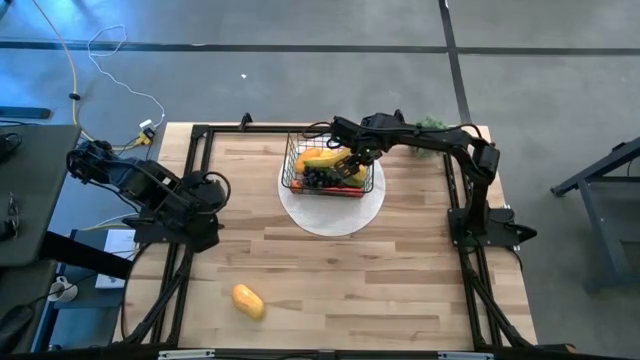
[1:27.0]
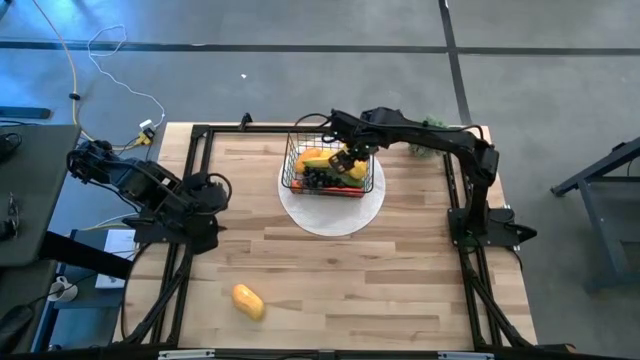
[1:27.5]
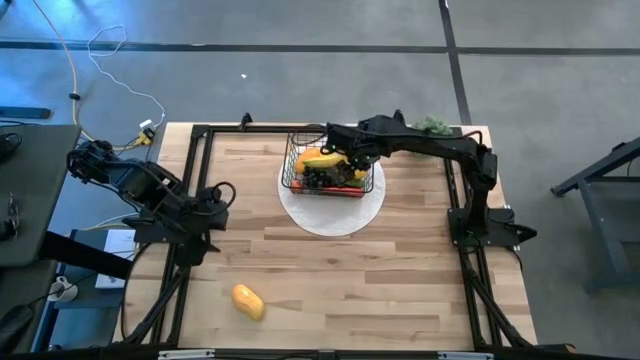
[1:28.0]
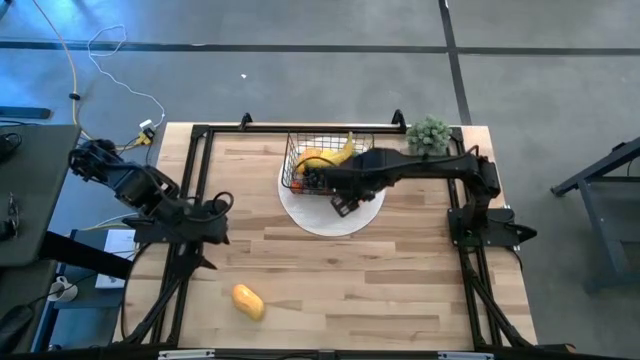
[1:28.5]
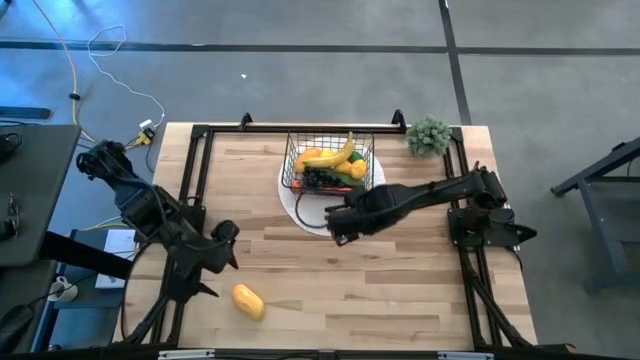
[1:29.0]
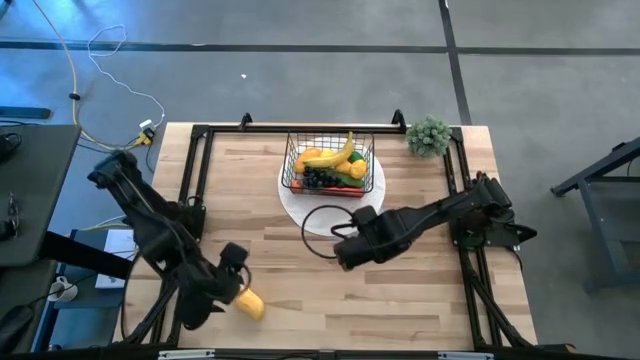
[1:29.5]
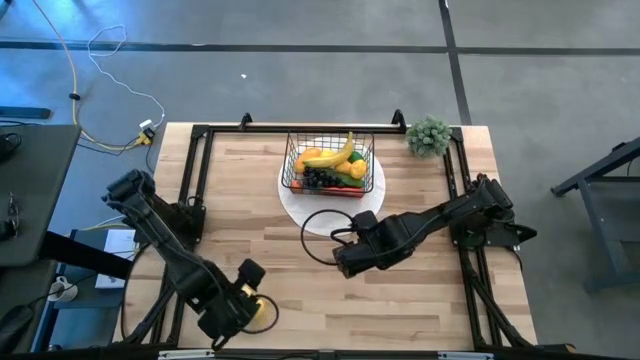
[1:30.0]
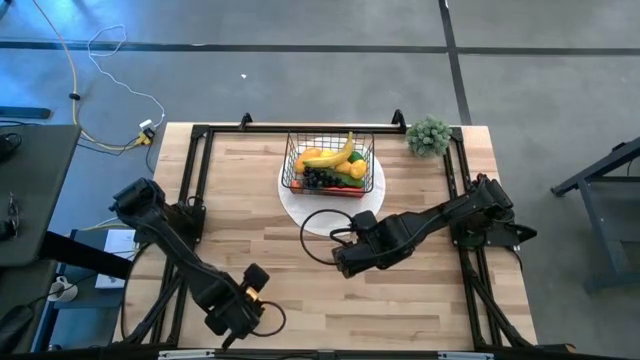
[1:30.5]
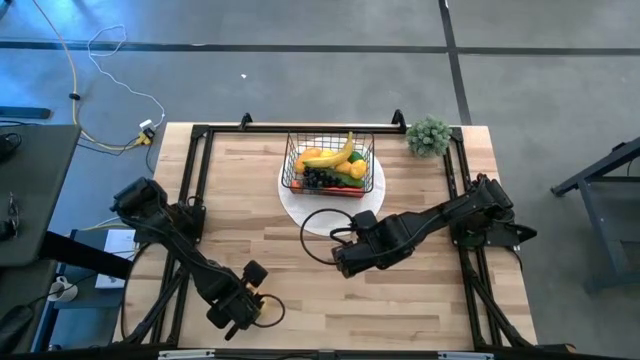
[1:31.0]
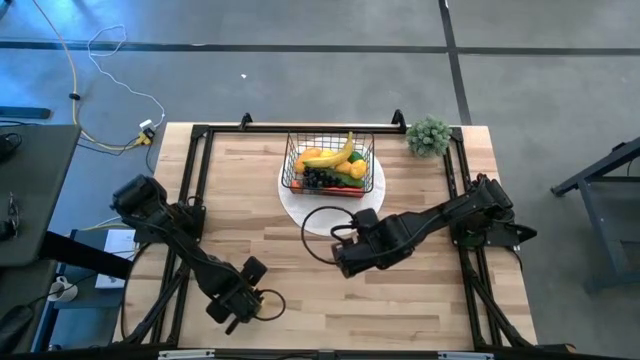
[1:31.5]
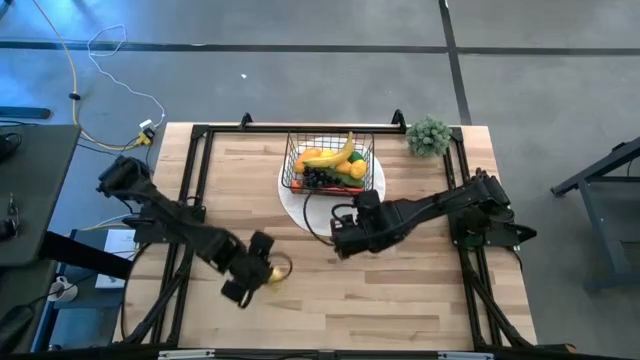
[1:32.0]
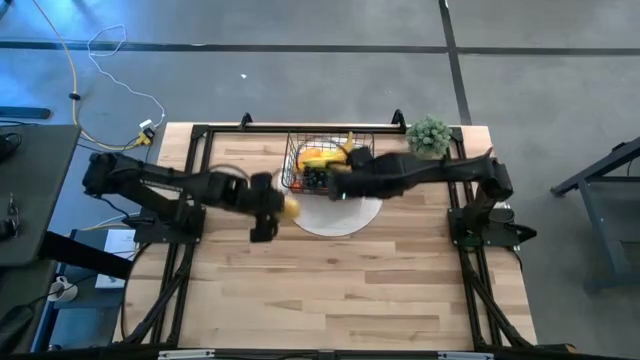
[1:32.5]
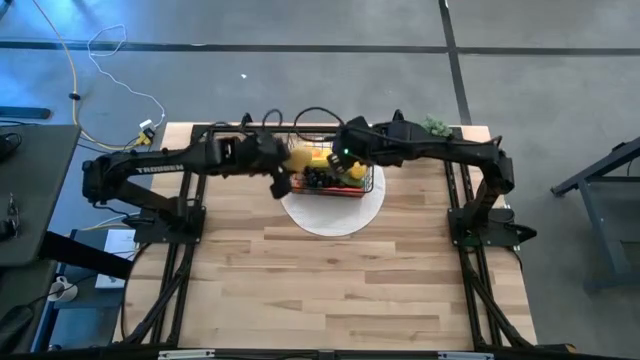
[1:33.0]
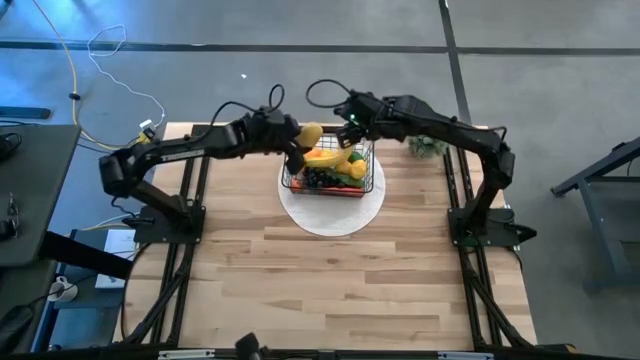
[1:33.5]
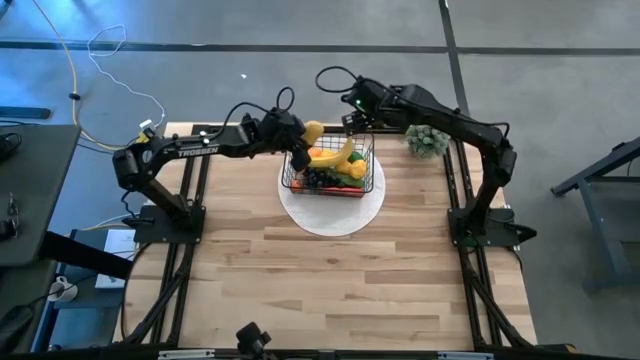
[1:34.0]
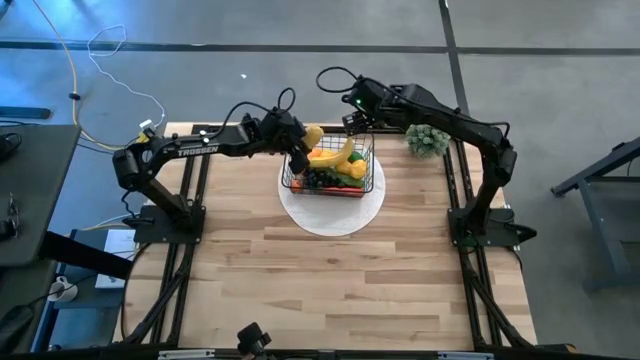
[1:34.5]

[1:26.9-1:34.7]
Task: Build produce basket
Put the yellow mango into the wire basket

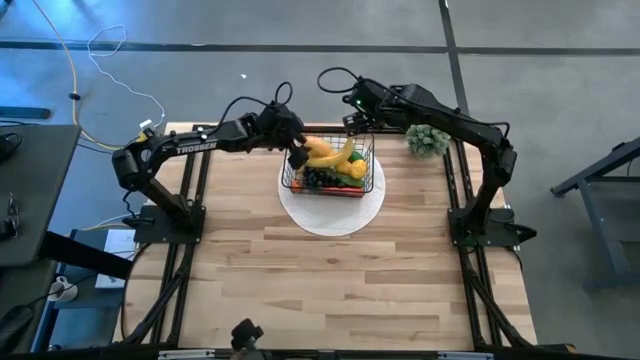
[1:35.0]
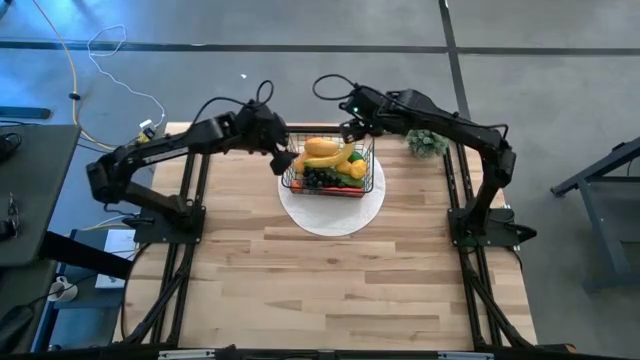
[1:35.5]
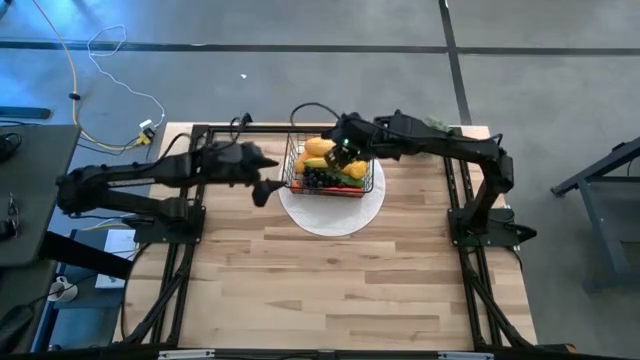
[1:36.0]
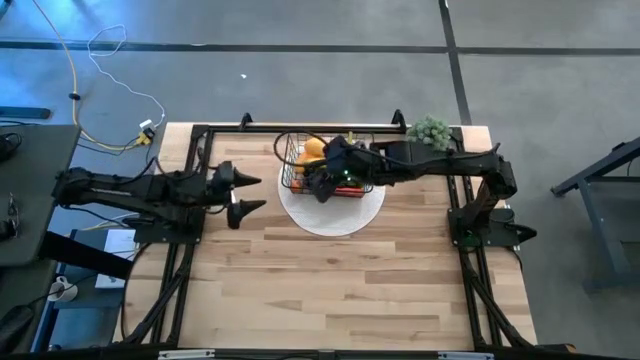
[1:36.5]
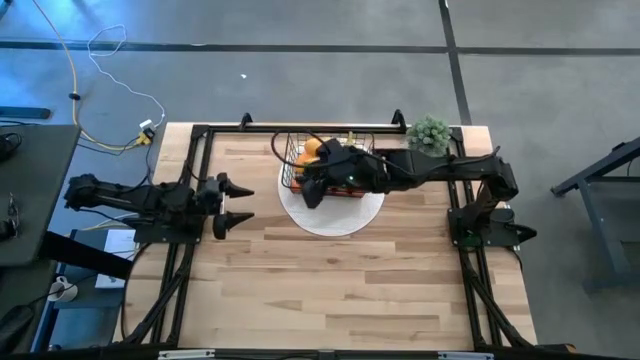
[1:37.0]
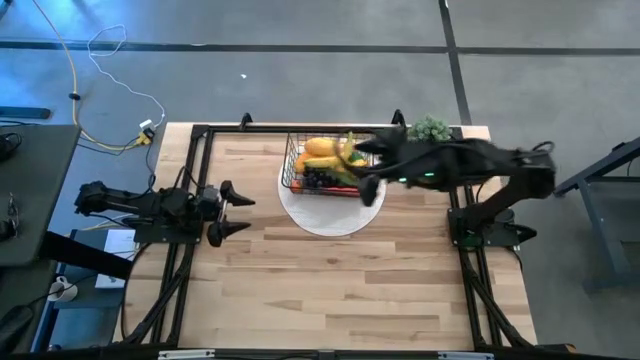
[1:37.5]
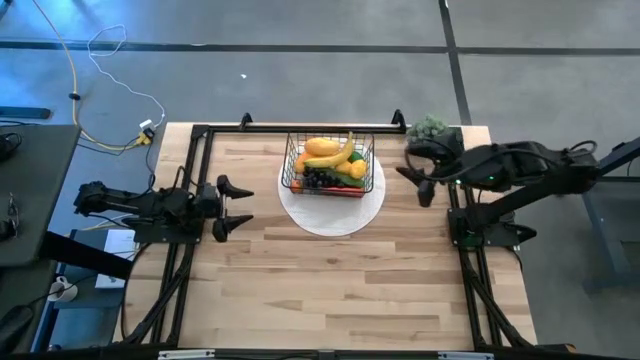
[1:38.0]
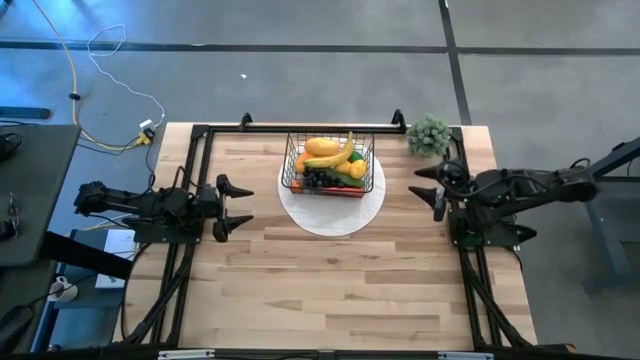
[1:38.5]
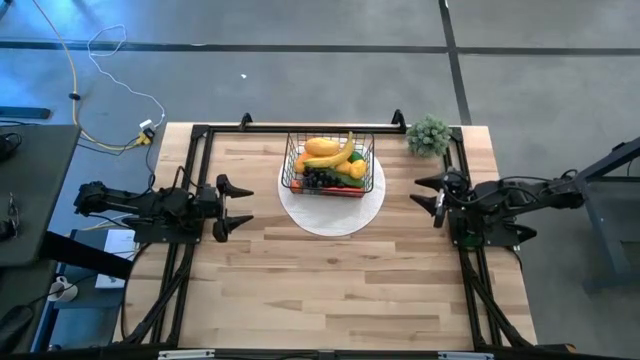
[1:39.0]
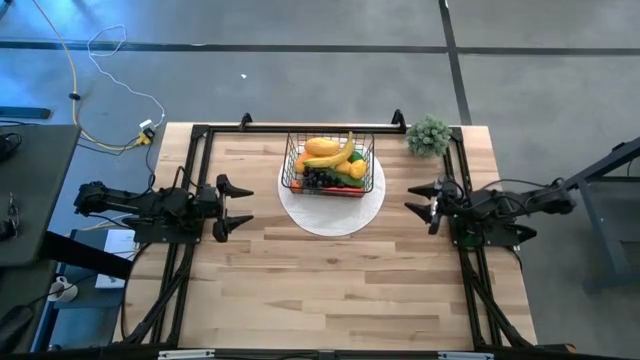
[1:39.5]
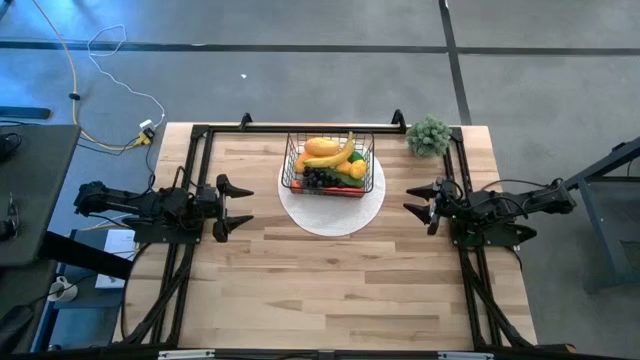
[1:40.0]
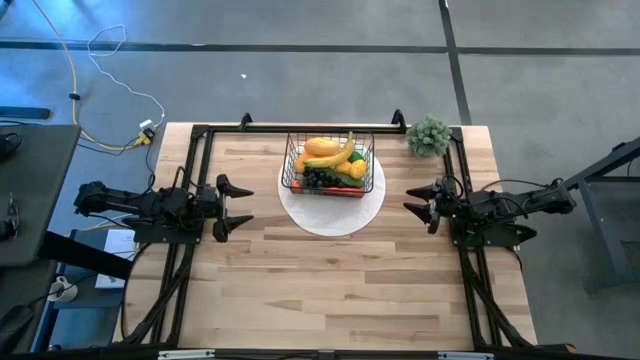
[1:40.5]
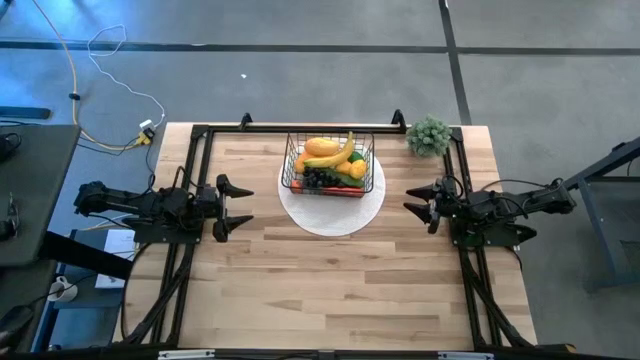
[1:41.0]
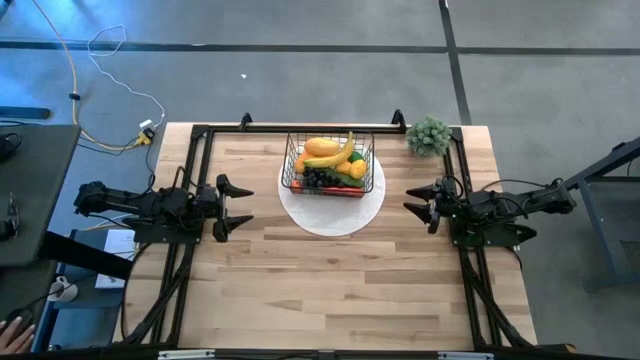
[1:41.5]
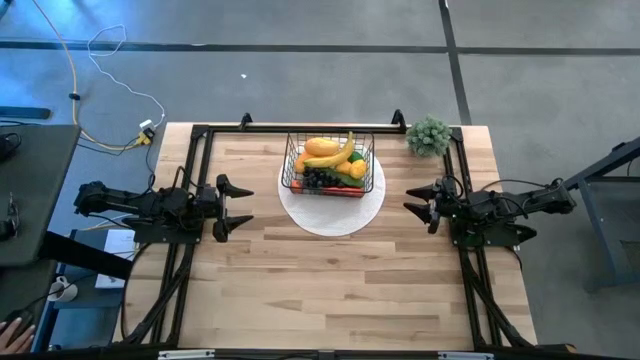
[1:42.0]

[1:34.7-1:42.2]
Return to Home Position

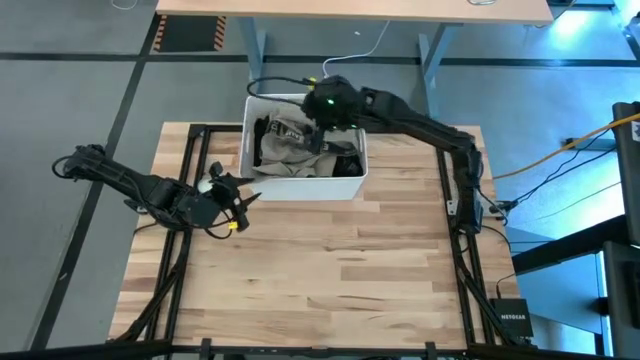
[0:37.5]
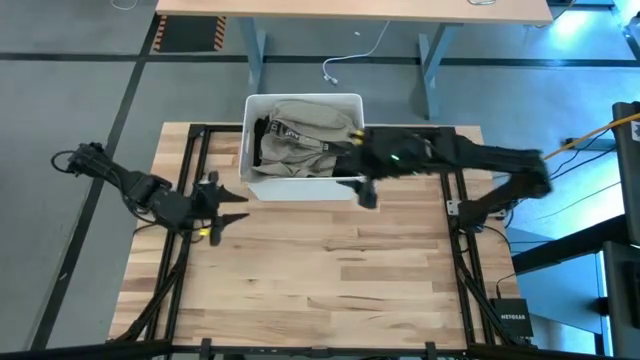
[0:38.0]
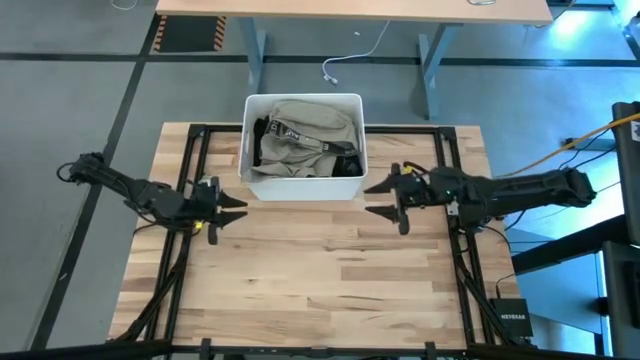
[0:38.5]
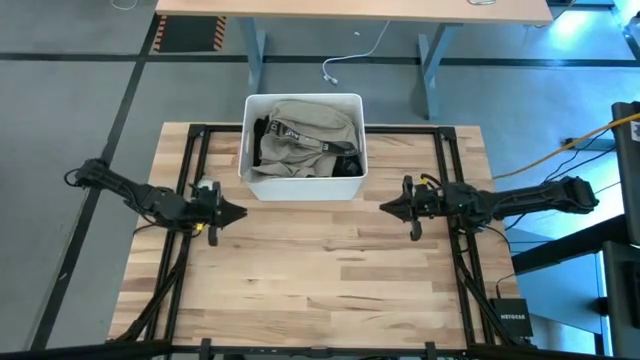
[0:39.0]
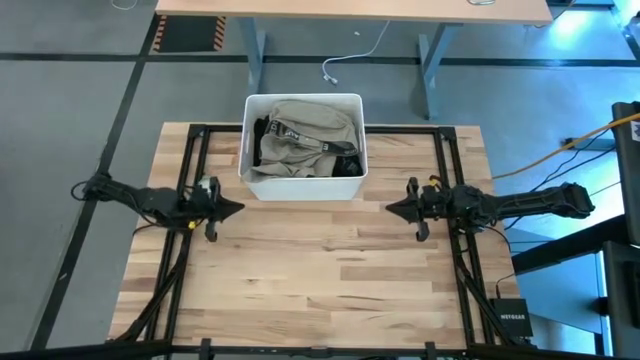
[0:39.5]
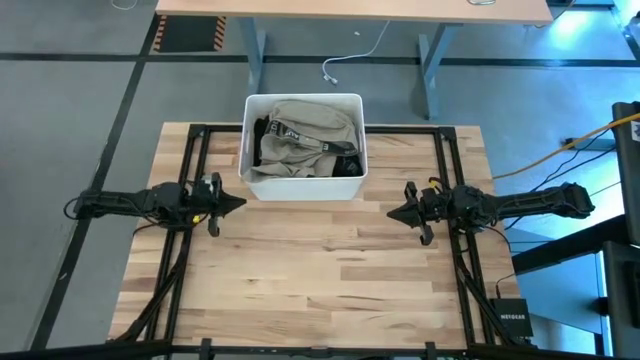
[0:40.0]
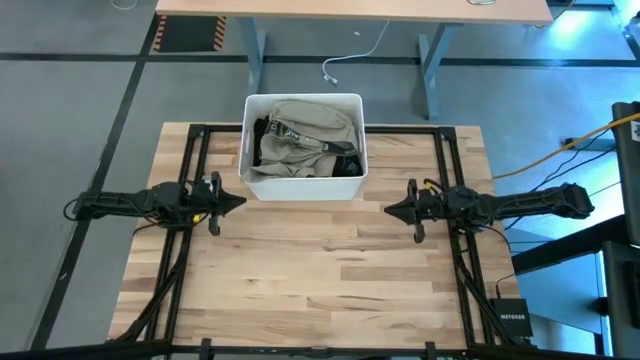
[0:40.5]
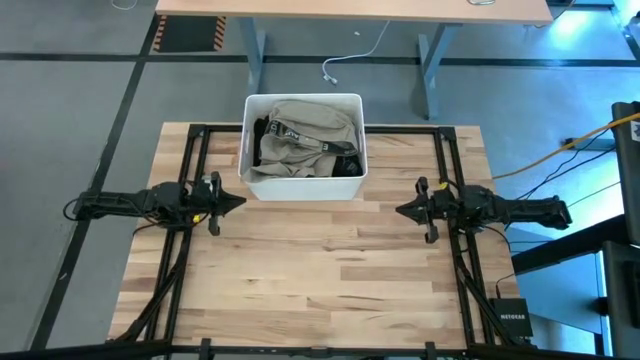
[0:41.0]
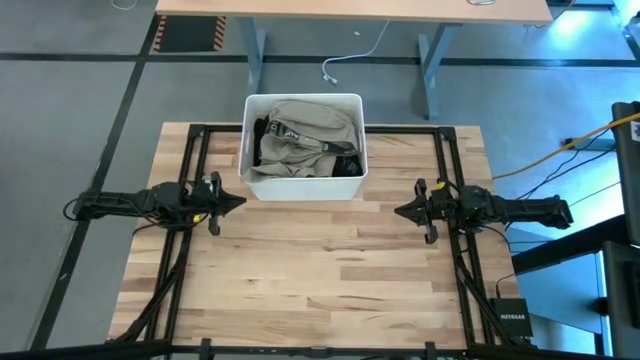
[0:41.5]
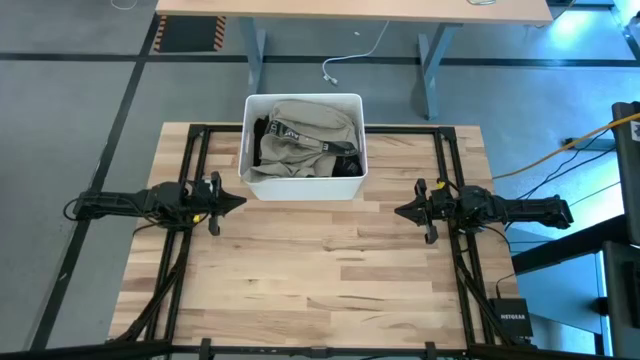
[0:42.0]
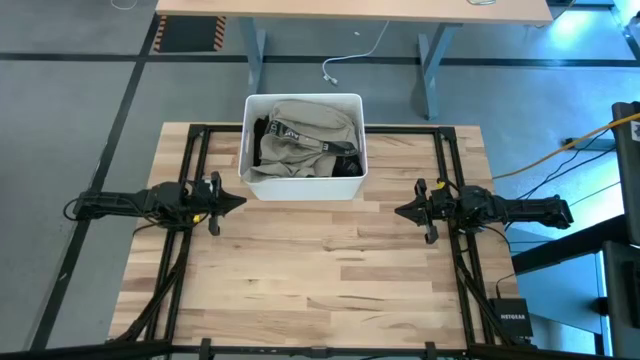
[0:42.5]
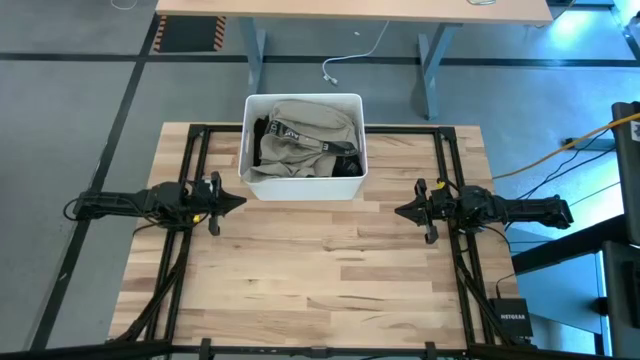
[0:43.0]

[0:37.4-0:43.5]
Task: Sort clothes
Return to Home Position
